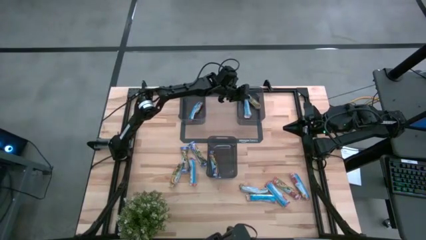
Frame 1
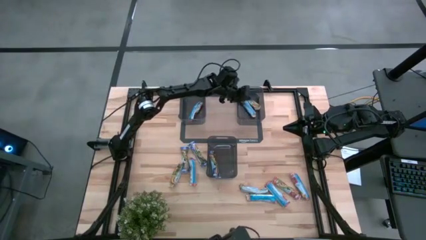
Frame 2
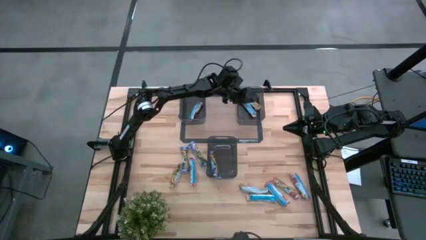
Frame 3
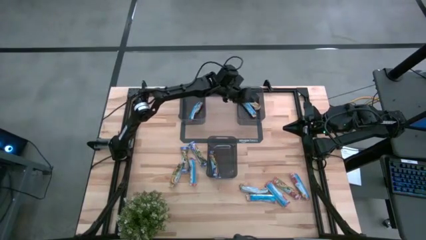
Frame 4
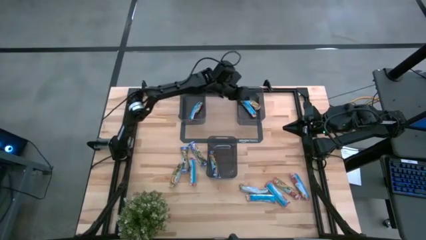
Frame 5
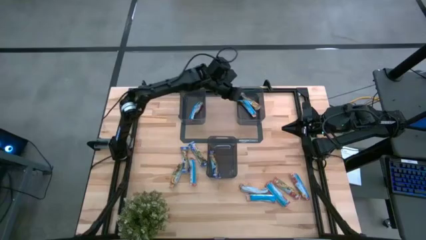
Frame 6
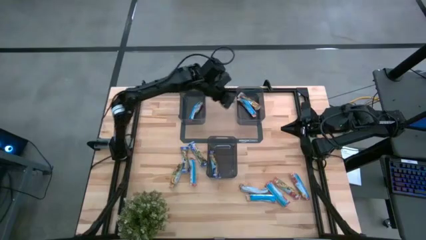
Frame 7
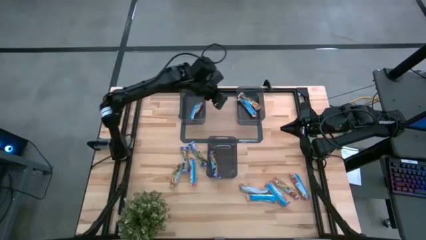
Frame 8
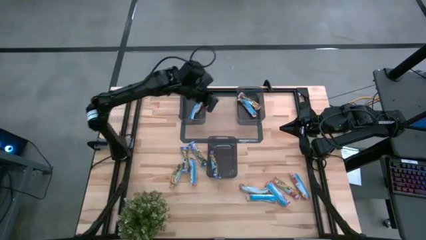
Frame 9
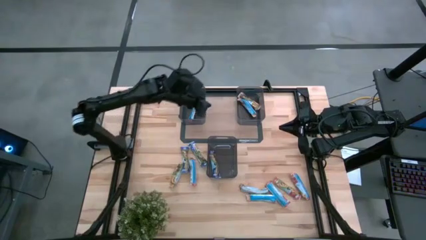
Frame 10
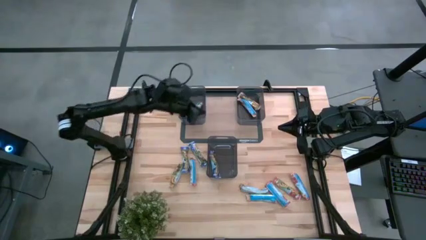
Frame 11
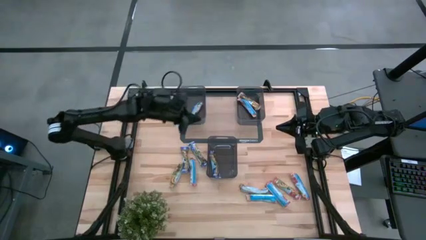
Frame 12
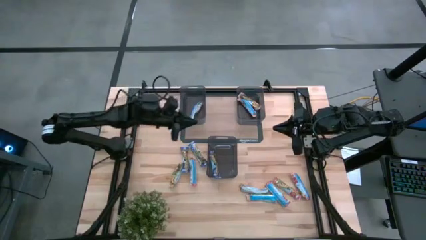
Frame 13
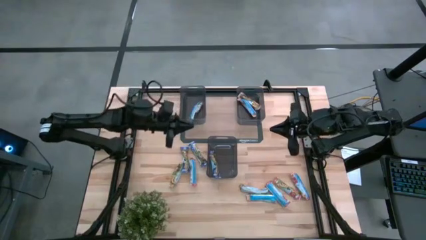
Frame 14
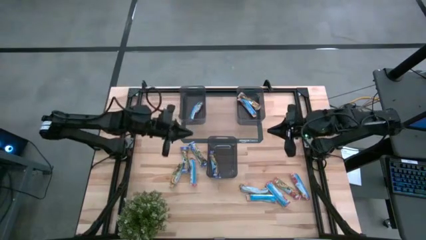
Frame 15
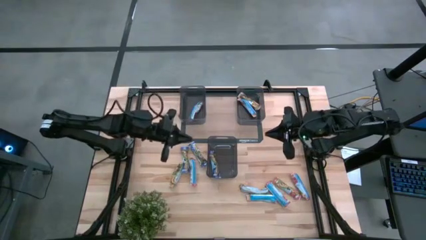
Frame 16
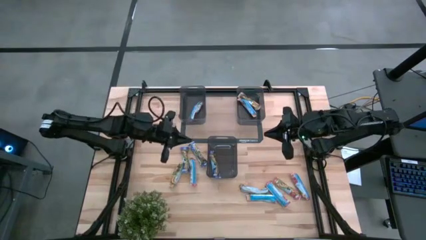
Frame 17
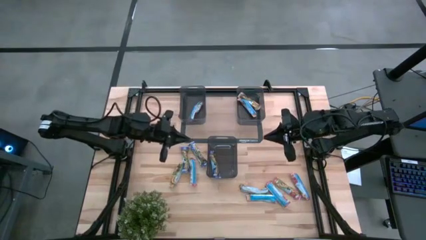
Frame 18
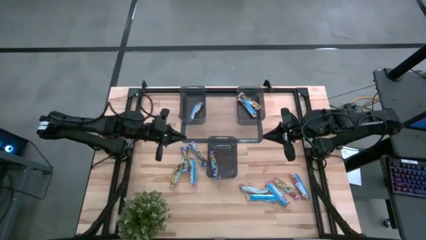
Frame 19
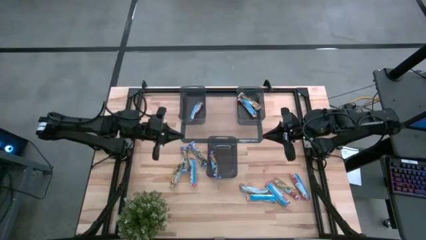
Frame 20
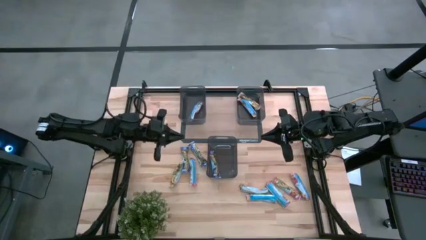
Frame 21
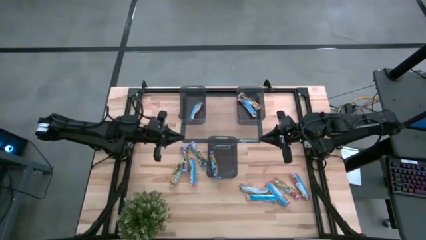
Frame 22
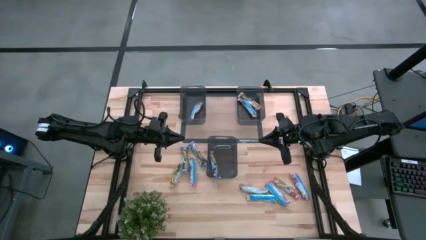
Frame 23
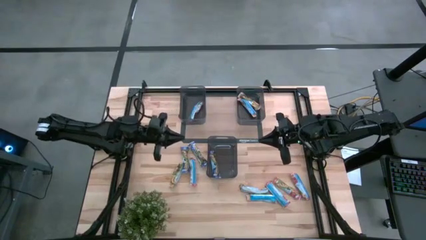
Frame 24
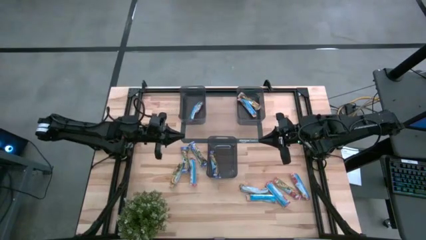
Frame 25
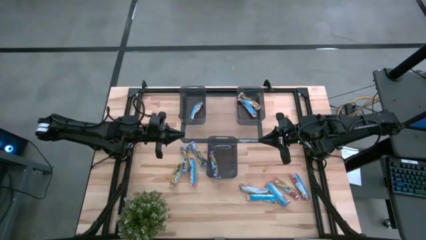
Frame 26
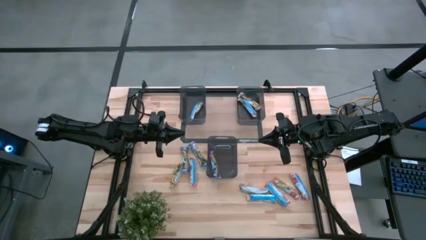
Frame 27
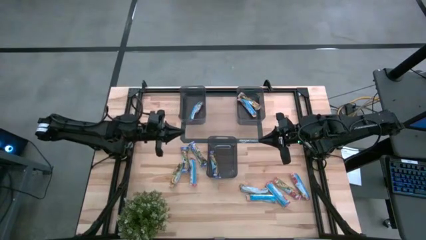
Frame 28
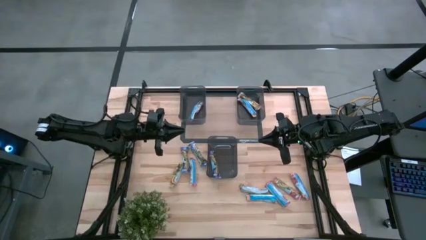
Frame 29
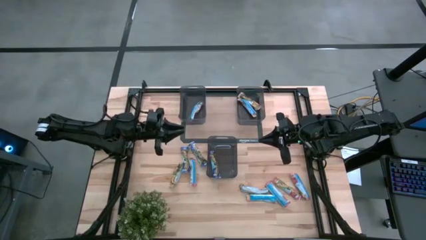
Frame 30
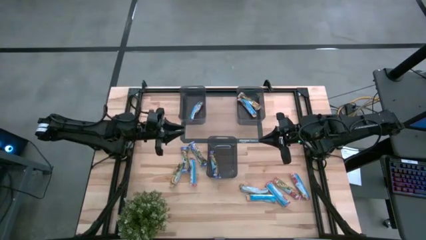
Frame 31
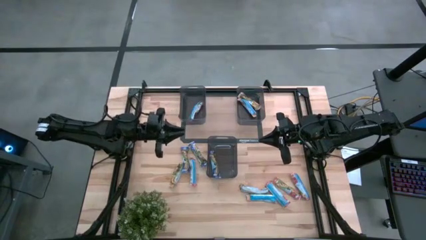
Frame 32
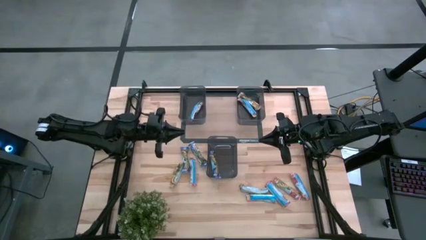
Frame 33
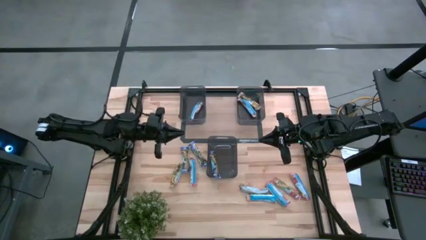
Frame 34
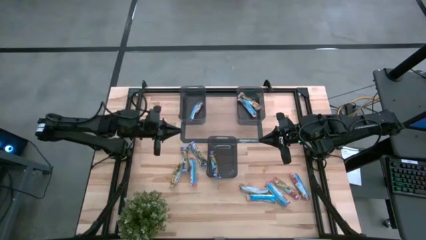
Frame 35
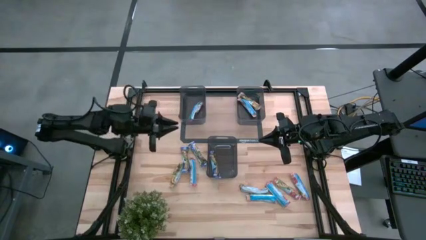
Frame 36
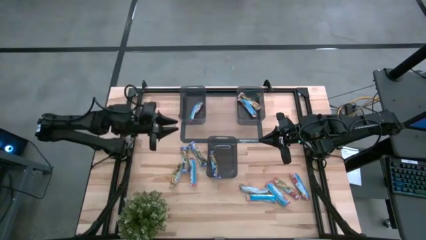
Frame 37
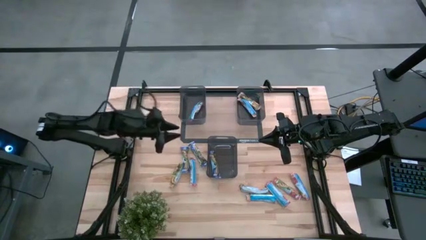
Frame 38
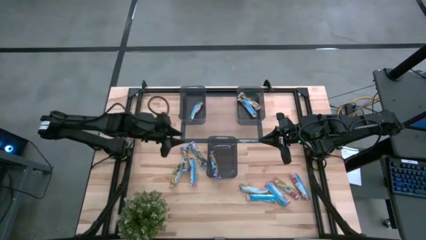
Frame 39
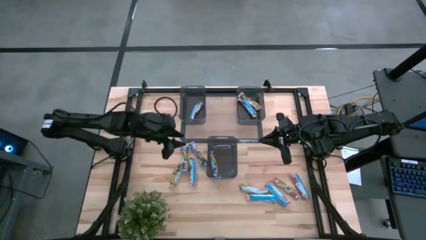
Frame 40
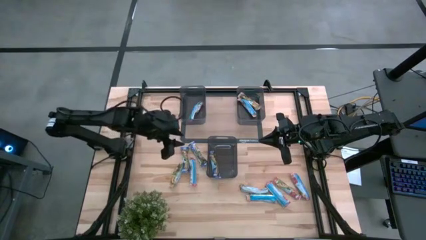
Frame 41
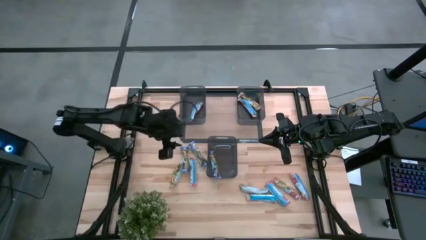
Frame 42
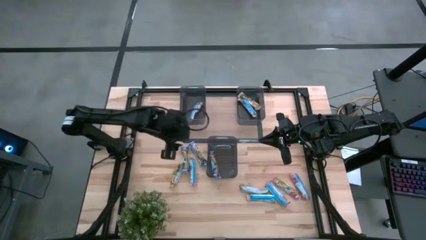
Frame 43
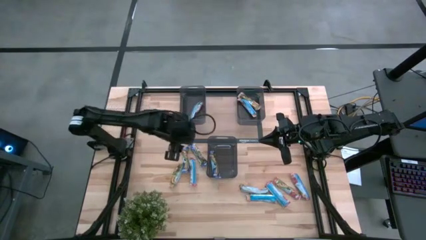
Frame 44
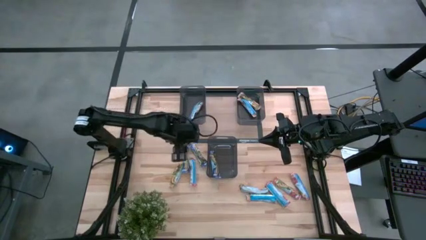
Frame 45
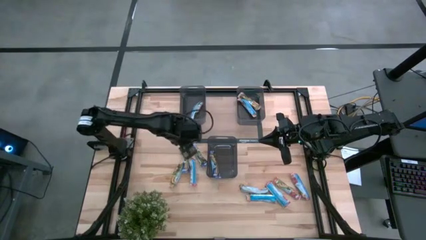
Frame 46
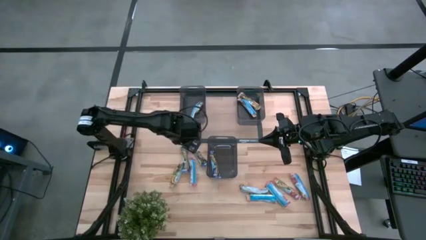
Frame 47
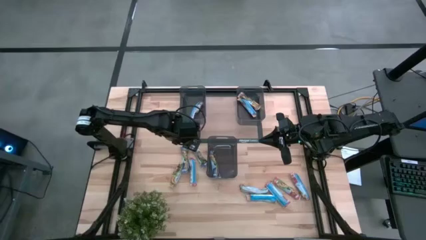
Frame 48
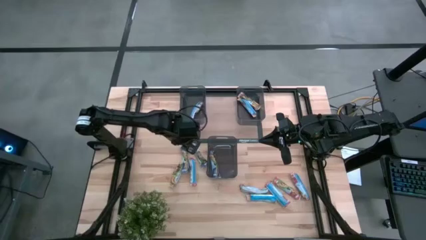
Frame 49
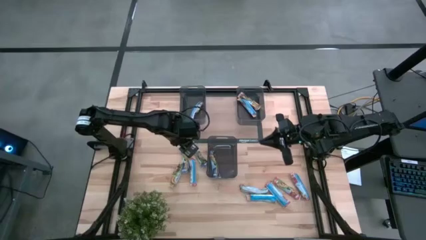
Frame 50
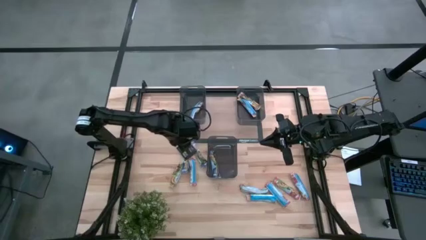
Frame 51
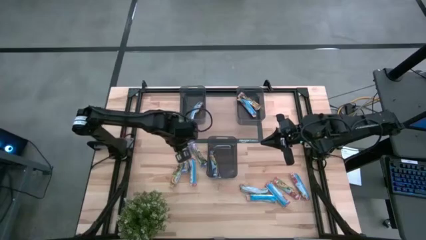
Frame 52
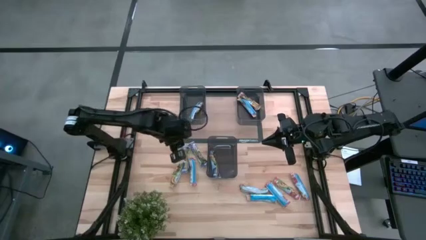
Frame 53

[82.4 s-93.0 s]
Task: Pick and place Granola Bars by type
Put the yellow granola bar into the right black bin

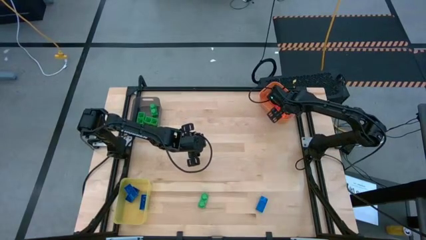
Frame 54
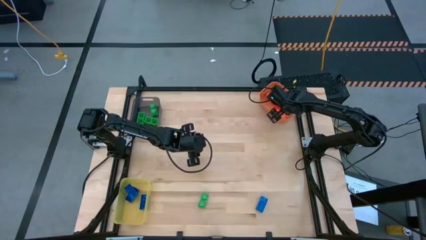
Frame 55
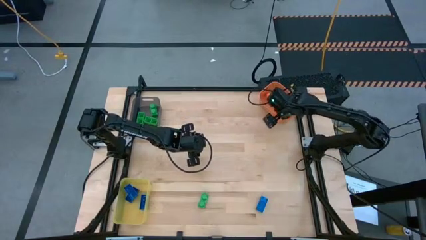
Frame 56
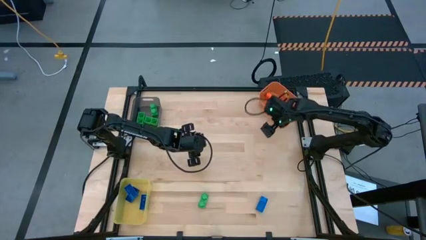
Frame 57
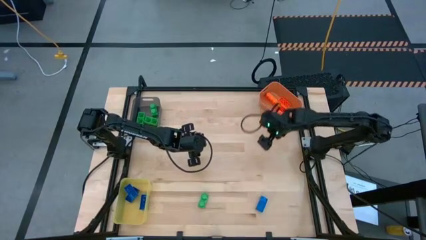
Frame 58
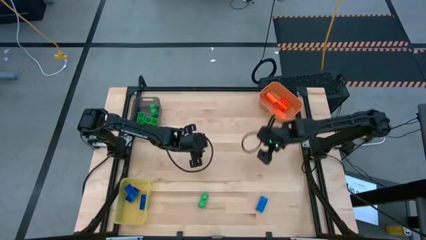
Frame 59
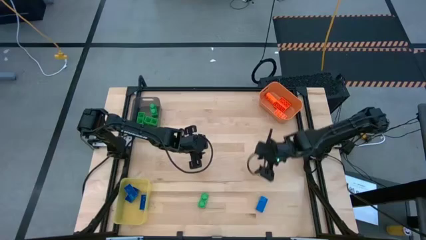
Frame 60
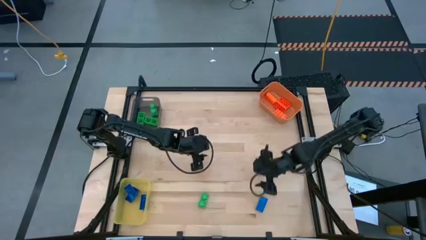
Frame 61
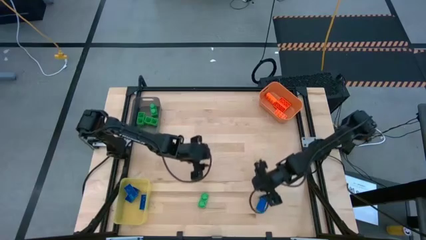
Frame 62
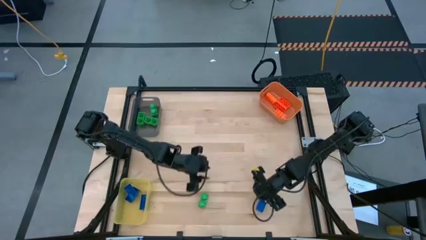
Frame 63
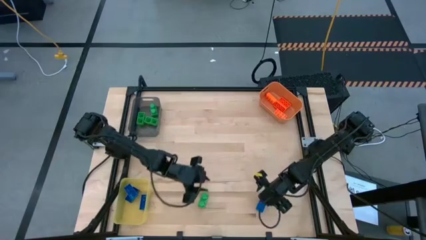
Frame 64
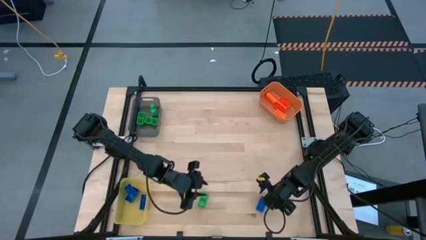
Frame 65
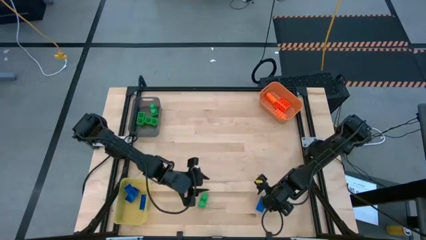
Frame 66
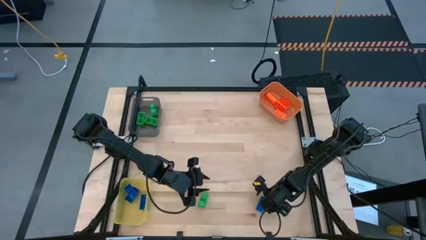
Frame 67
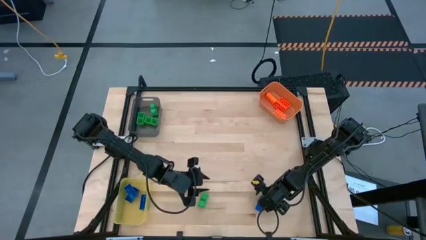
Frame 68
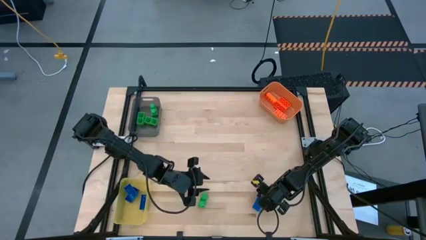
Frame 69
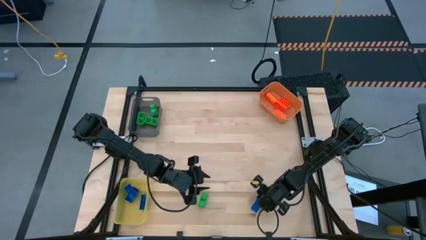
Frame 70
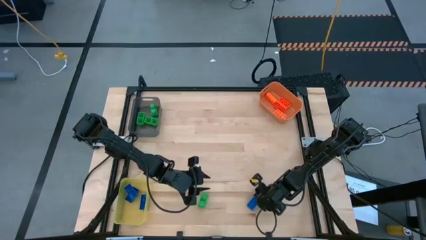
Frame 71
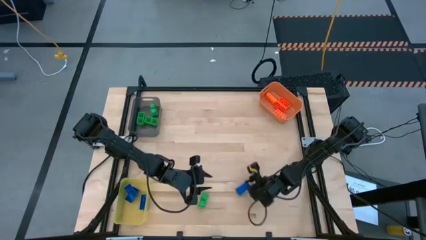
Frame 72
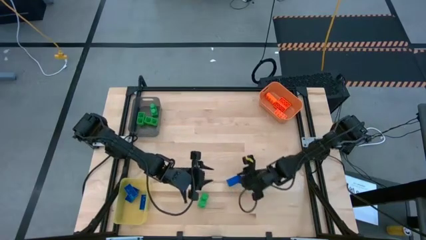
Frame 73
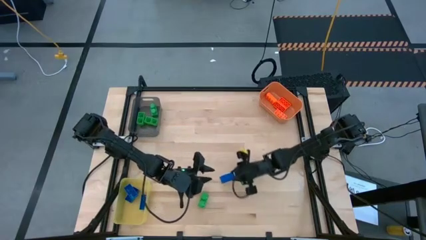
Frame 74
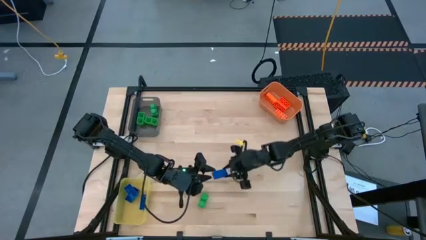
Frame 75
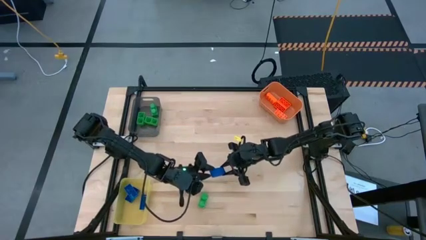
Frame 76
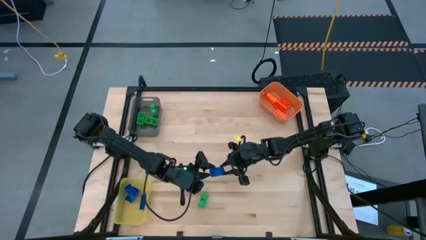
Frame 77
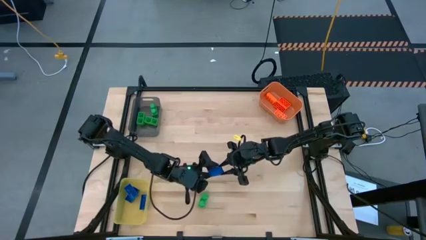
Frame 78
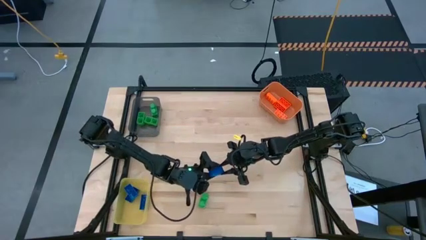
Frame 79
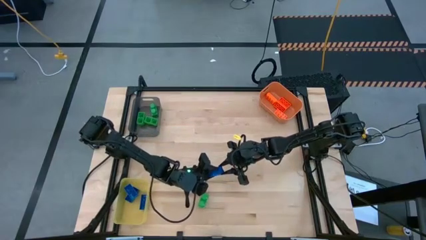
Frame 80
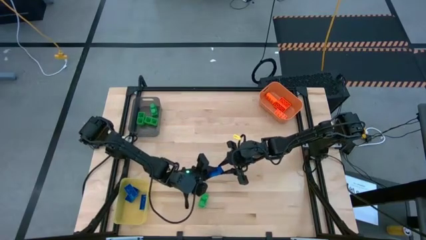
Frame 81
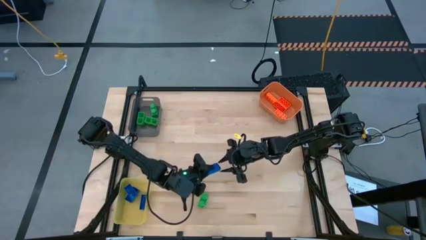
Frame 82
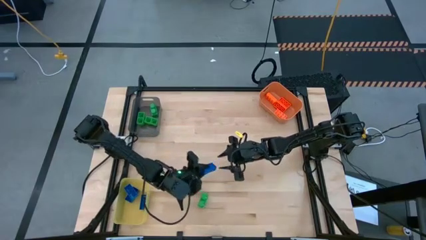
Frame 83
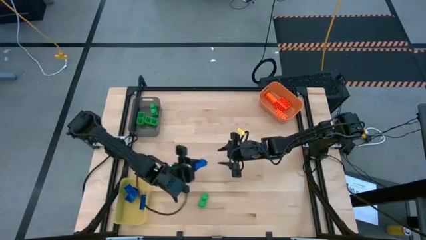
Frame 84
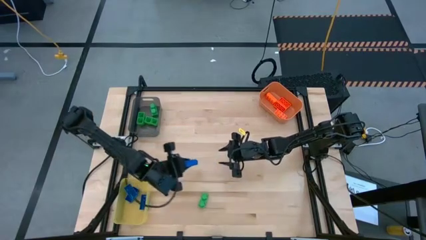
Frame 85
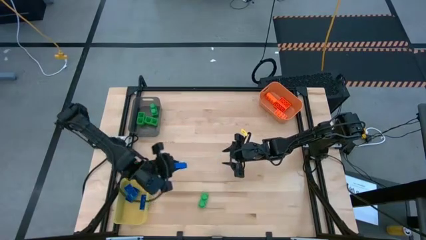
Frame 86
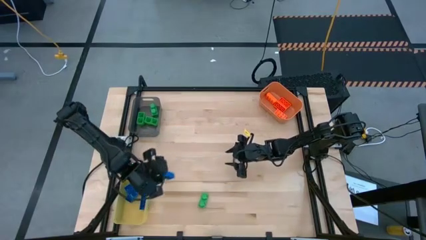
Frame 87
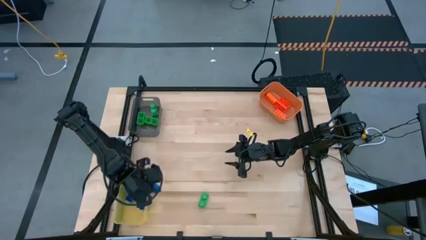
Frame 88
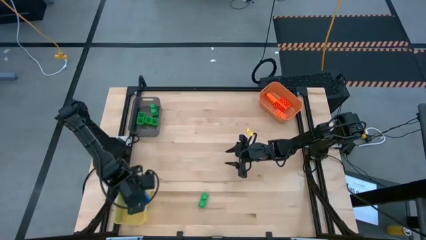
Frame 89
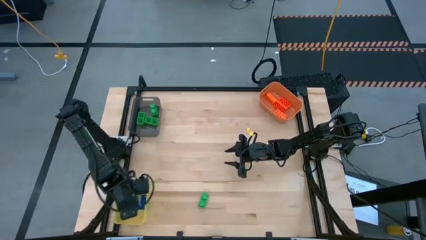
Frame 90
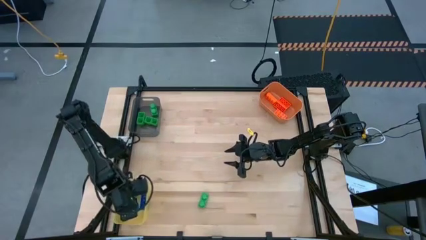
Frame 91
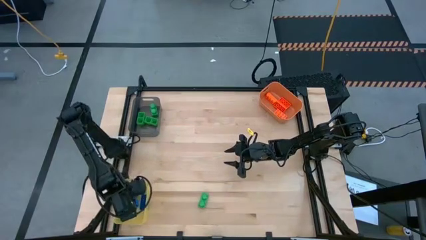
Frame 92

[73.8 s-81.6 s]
Task: Sort & place blocks by color
Put the blue game piece into the yellow bin
